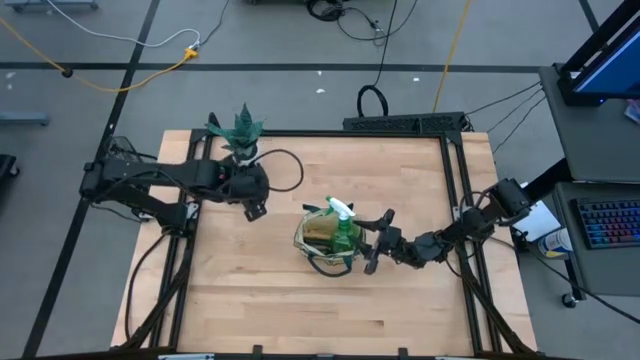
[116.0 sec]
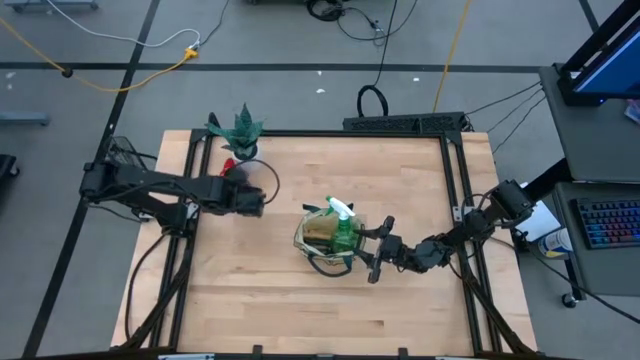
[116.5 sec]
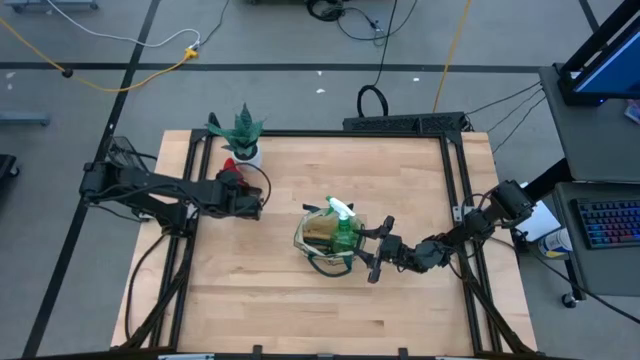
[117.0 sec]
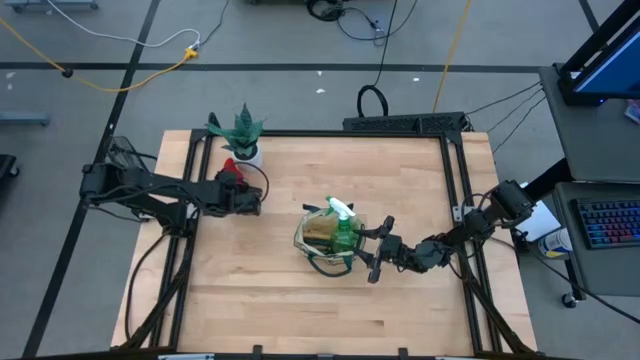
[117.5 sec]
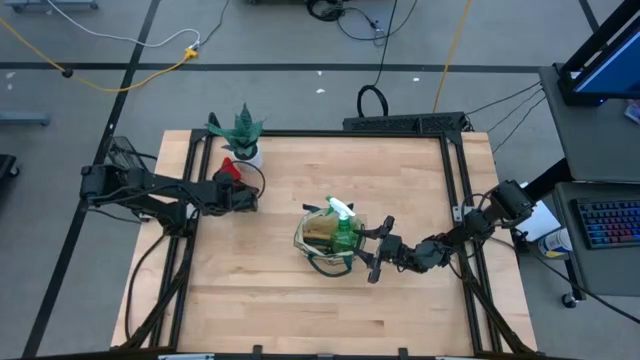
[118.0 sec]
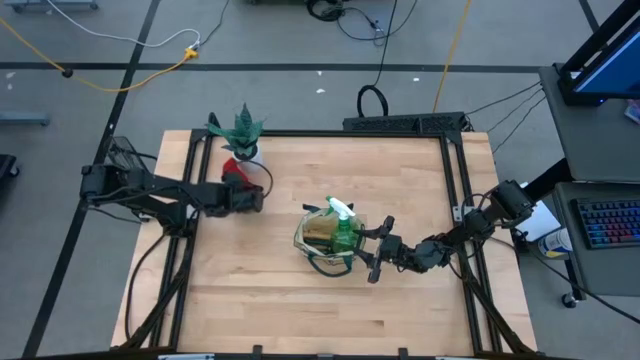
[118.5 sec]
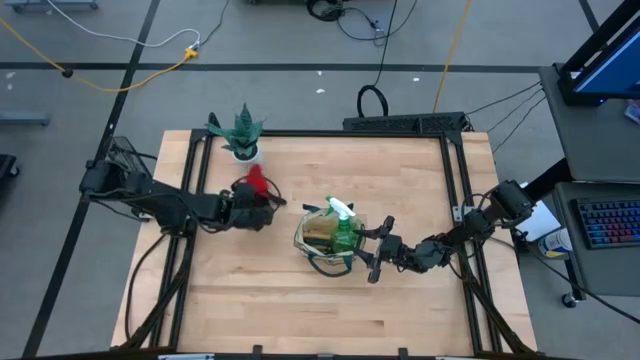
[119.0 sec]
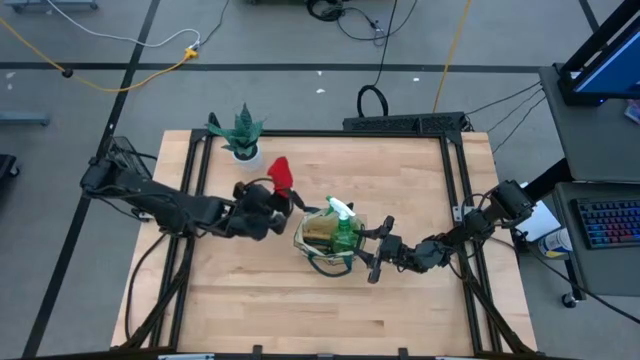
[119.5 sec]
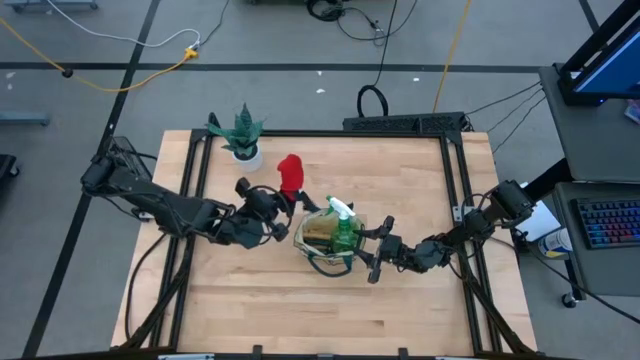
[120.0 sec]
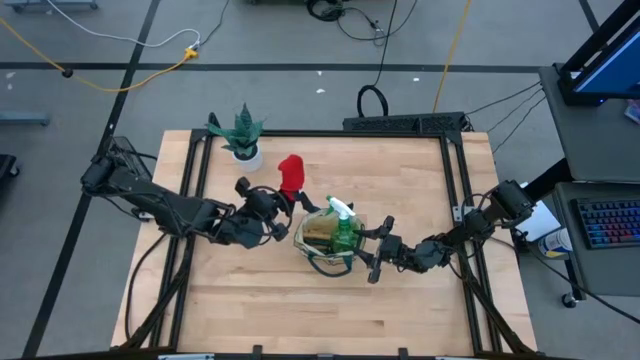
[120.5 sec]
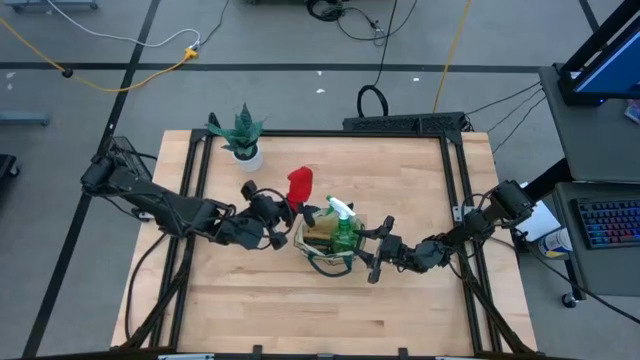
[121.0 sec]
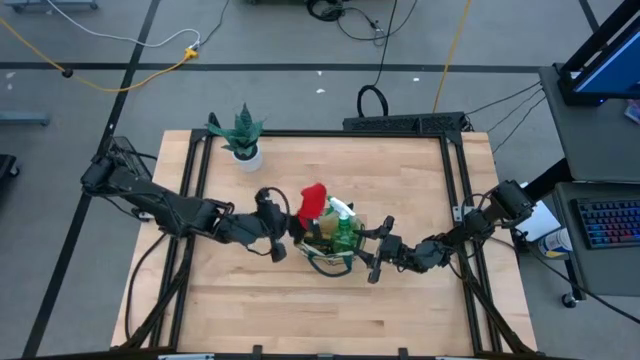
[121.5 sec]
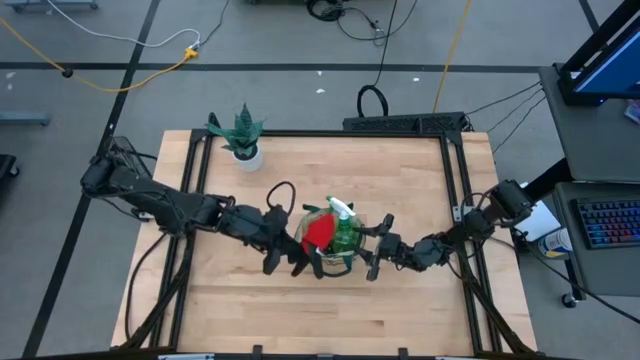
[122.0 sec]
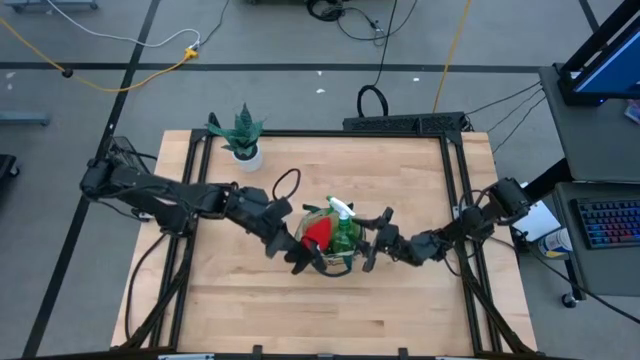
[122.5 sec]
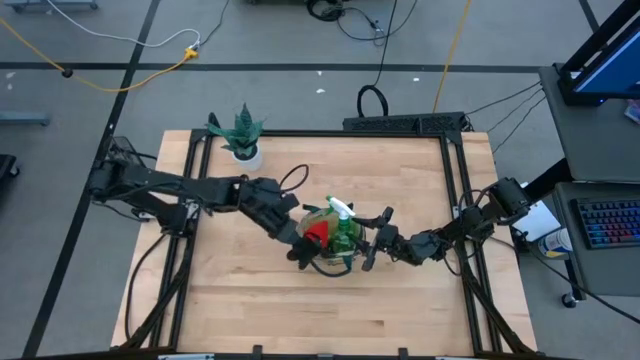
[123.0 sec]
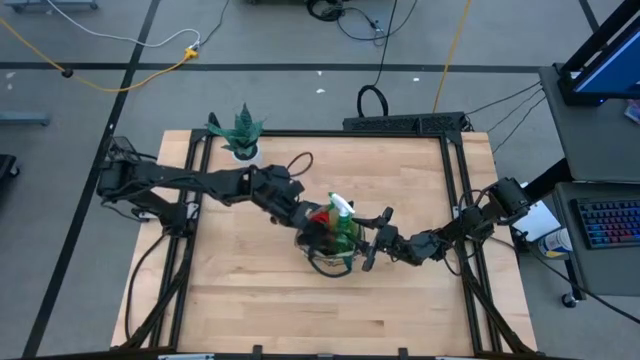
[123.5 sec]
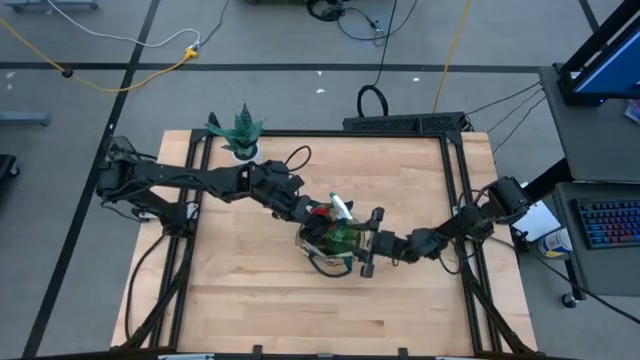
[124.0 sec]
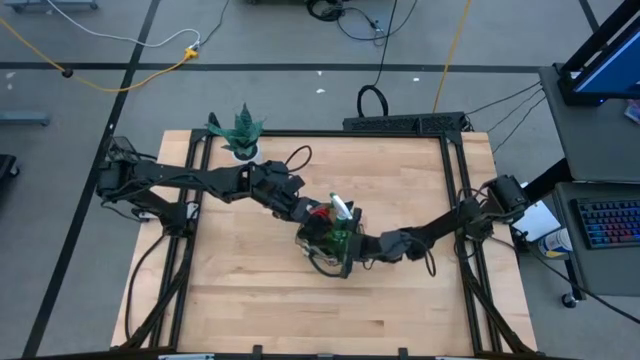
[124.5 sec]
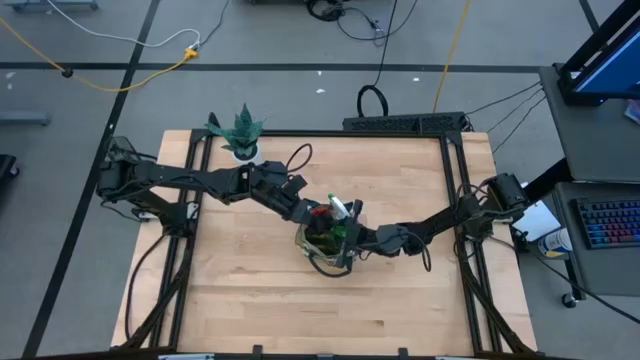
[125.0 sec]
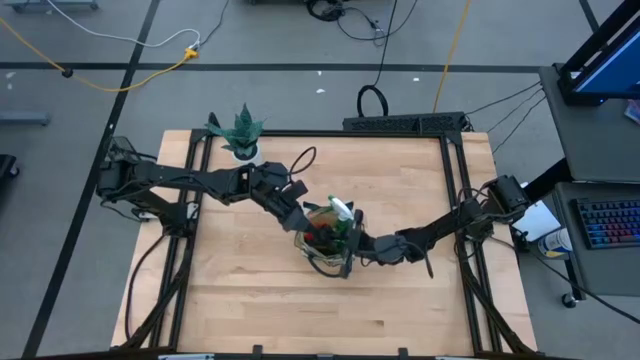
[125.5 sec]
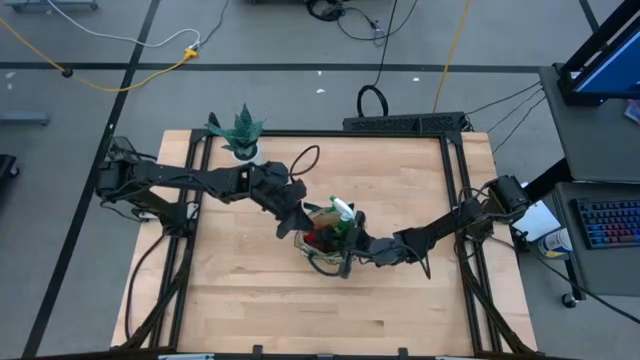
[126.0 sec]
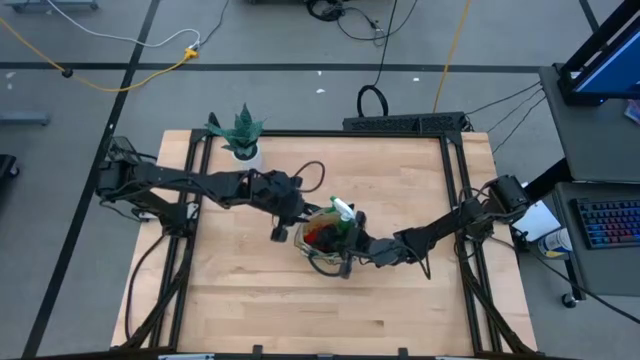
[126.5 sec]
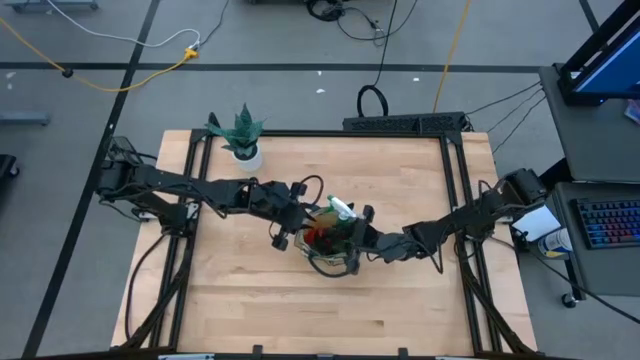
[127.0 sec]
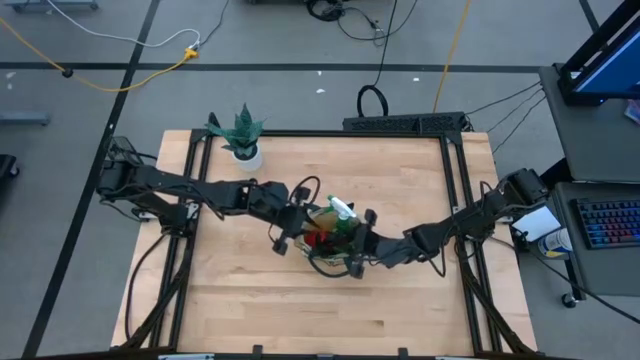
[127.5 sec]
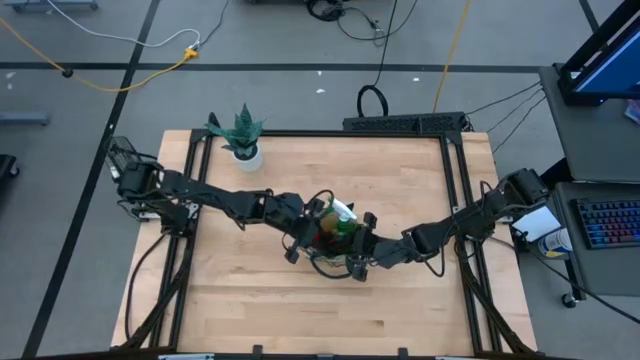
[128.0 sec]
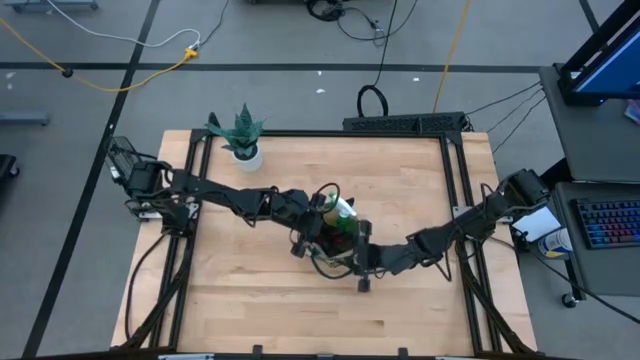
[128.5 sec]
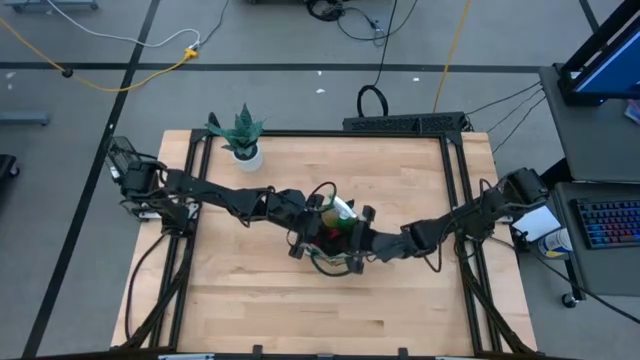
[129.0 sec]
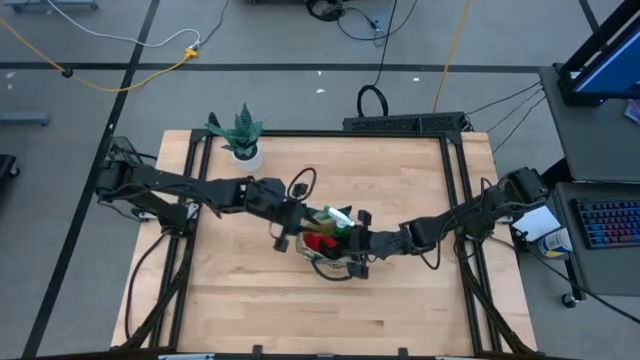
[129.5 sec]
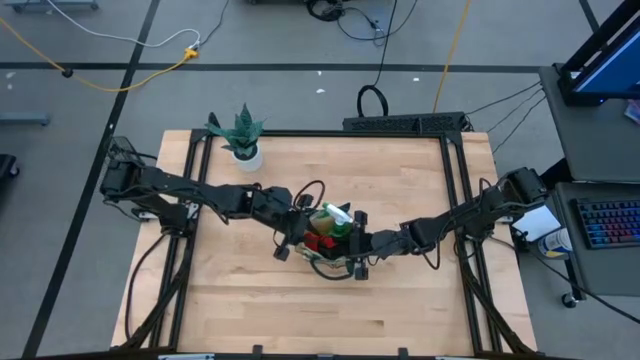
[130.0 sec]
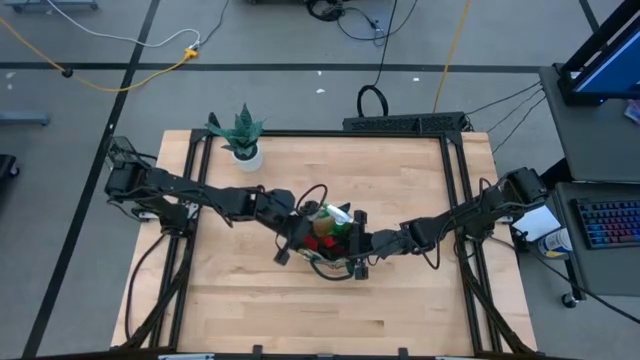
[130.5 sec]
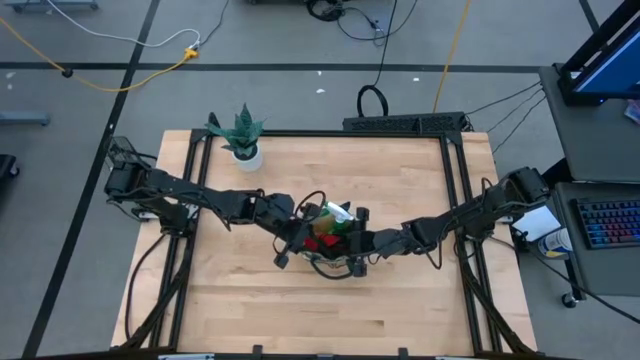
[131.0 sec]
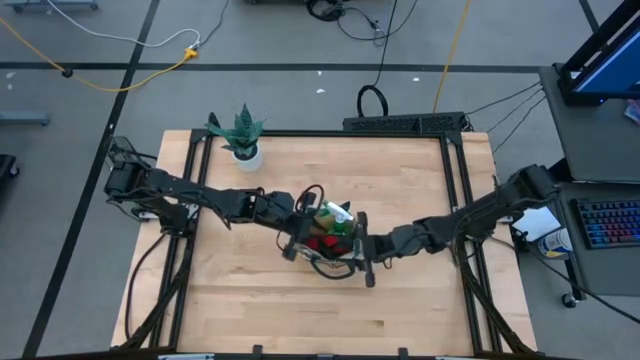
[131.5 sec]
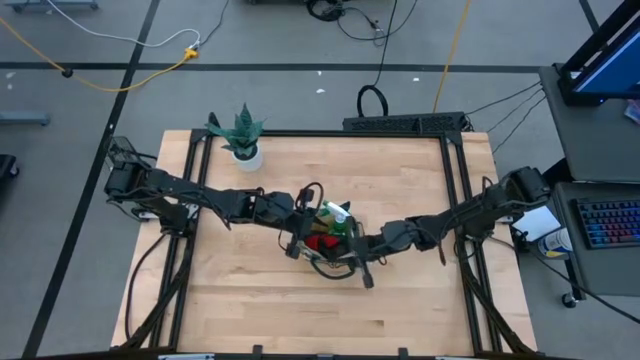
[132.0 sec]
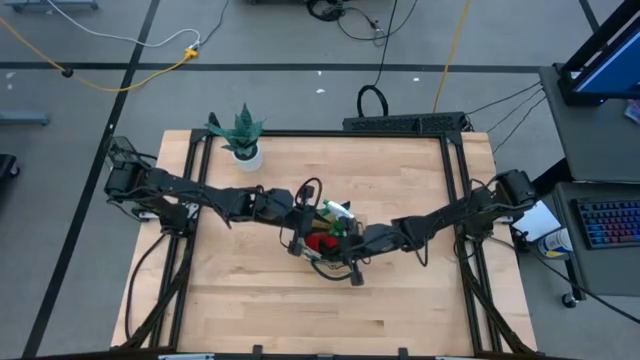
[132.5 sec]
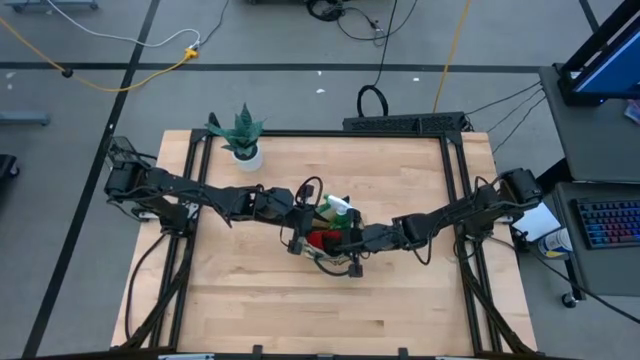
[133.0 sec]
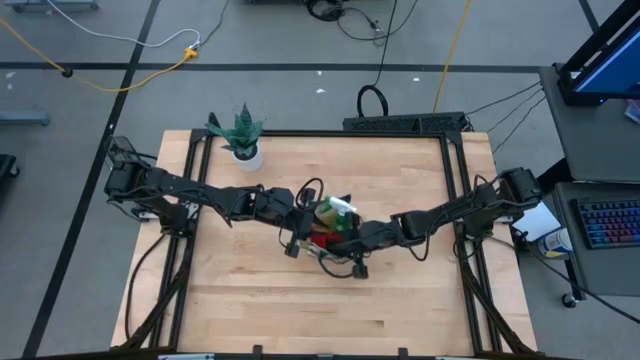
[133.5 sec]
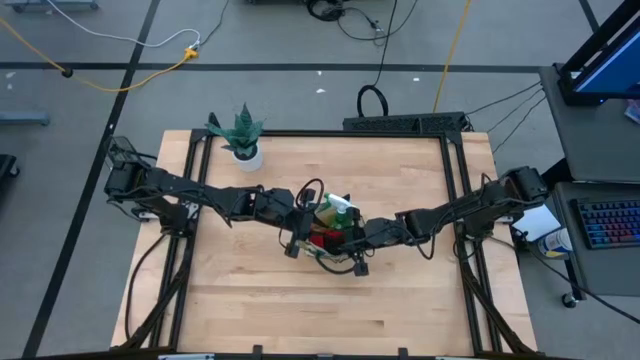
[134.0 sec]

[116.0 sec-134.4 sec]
Task: Pick & Place Garden tools in Gardening bag
Put the red gloves into the gardening bag

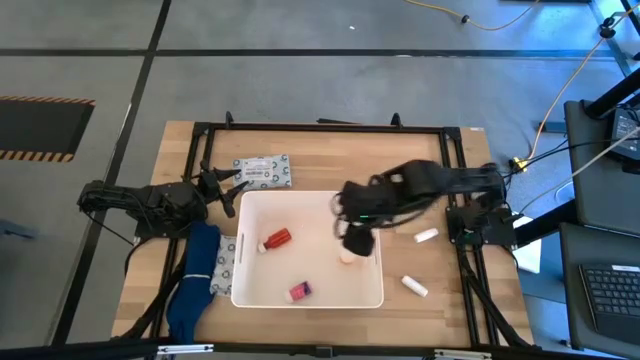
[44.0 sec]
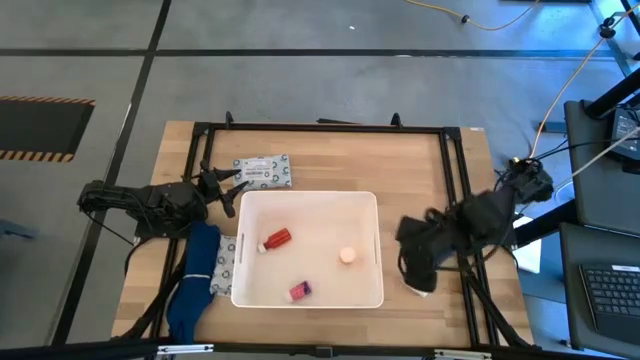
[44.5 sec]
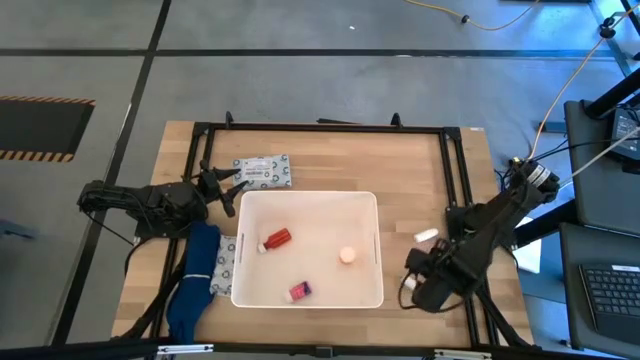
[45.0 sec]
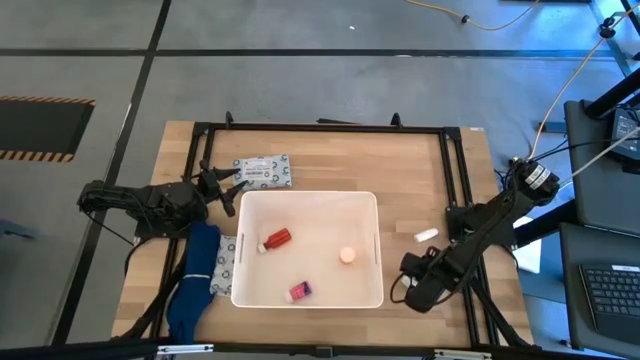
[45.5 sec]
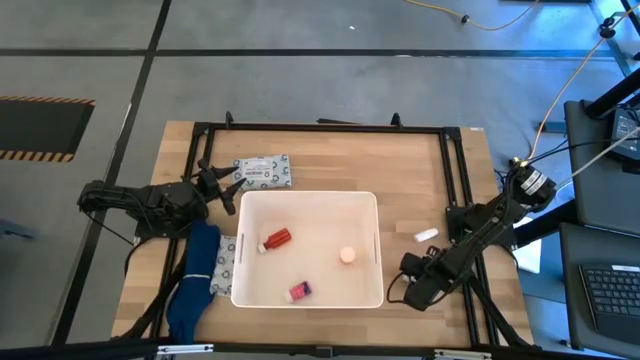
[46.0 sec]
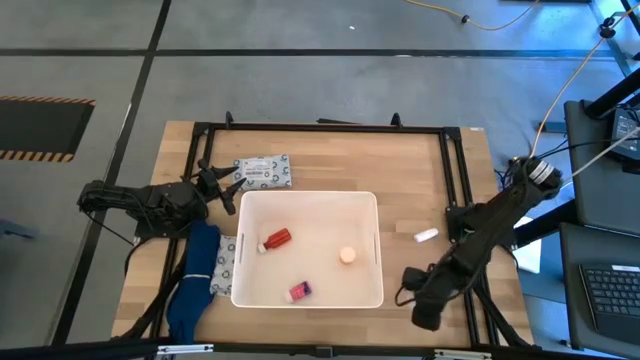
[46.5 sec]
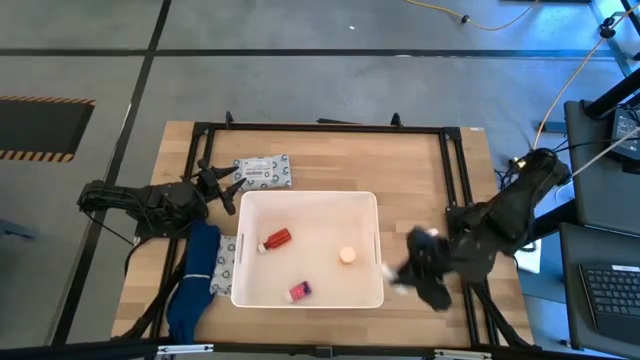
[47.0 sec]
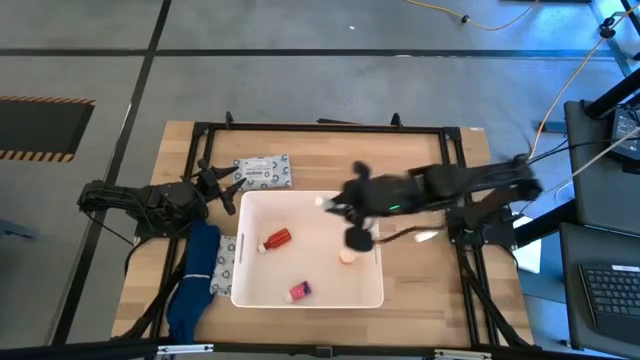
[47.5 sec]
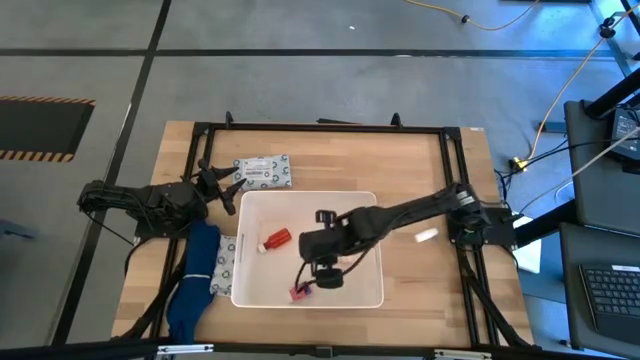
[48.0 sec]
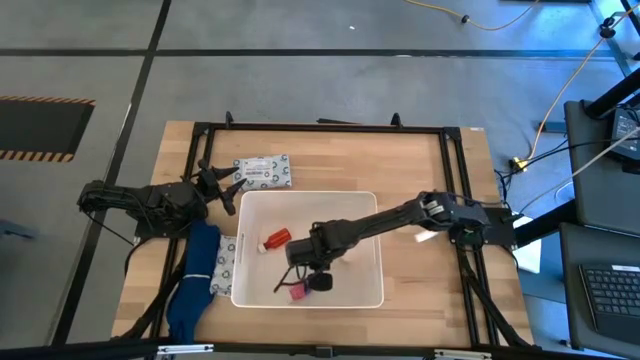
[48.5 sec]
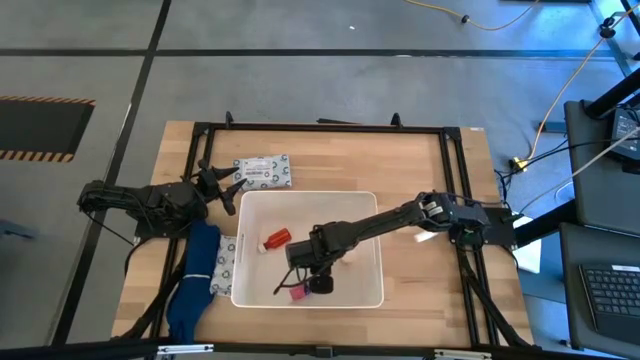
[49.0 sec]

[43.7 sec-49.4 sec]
Task: Pick & place medical supplies in basket/bin
Put the bottom white rolled gauze into the white bin
